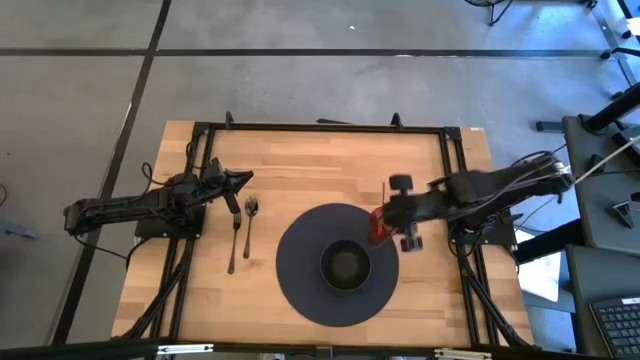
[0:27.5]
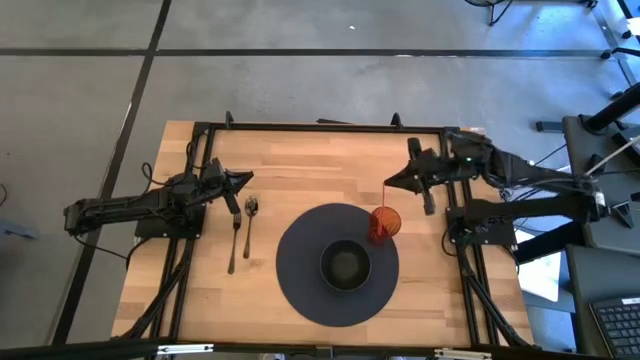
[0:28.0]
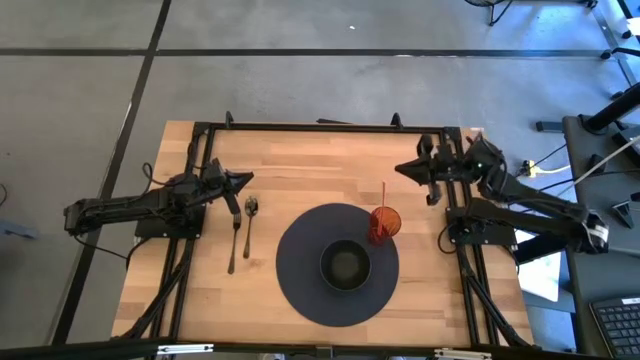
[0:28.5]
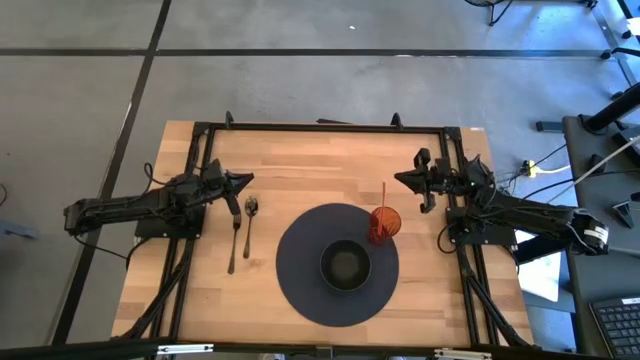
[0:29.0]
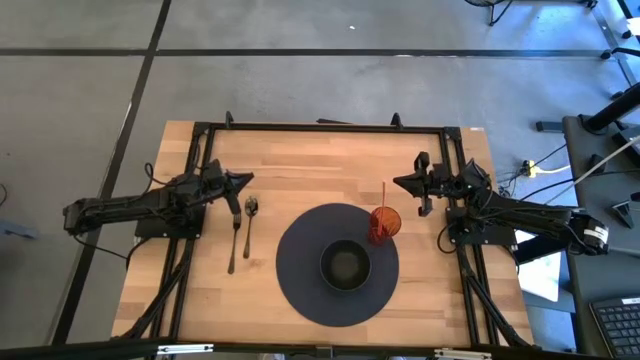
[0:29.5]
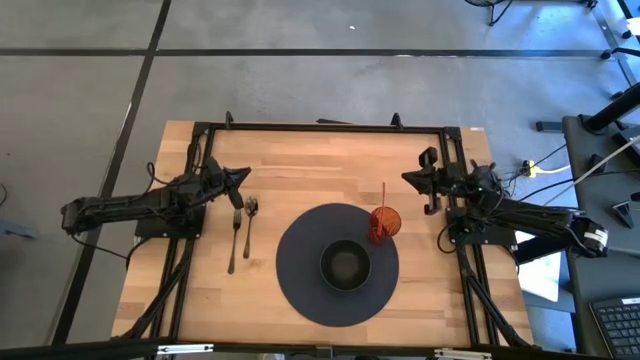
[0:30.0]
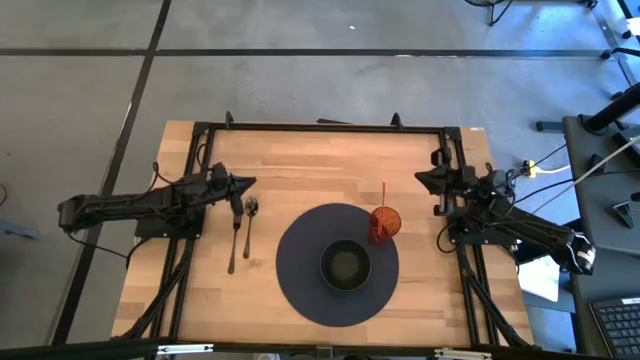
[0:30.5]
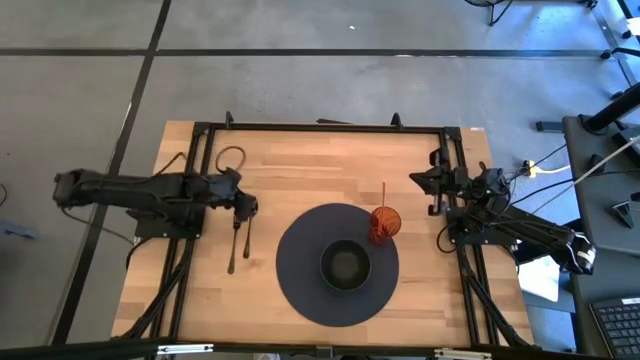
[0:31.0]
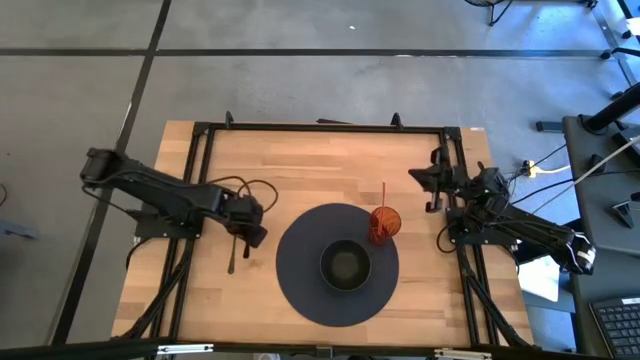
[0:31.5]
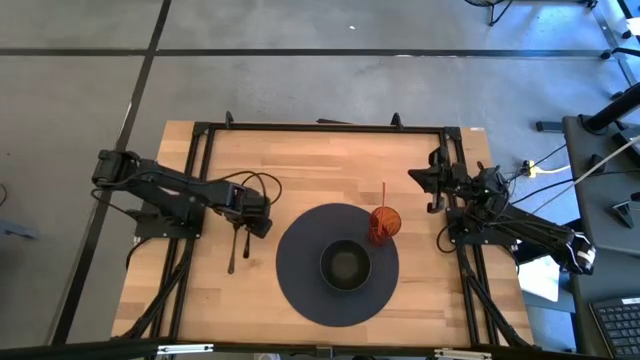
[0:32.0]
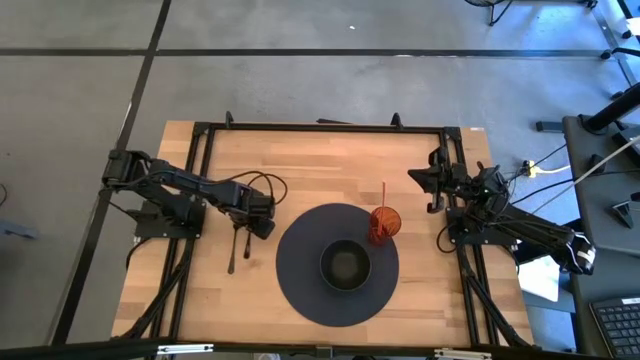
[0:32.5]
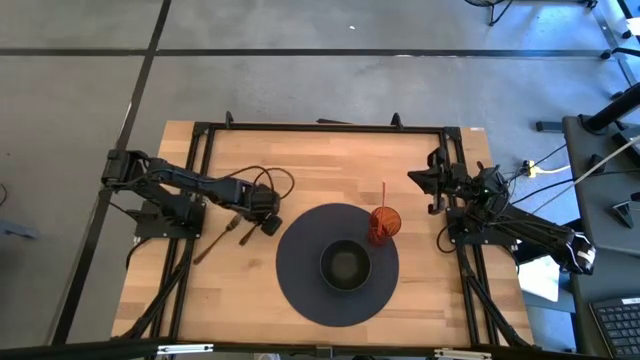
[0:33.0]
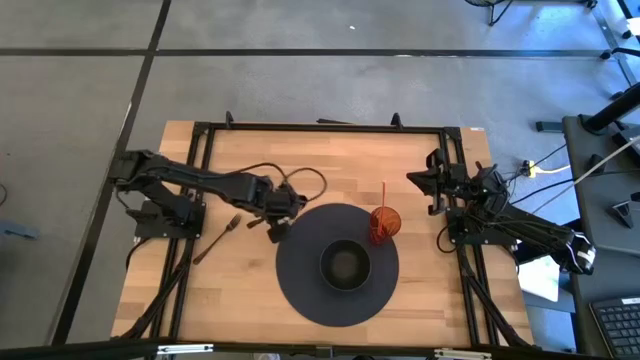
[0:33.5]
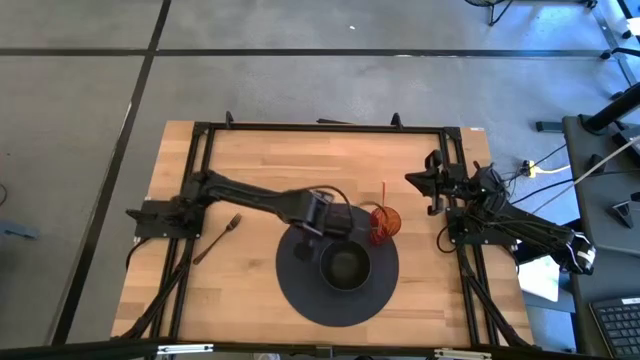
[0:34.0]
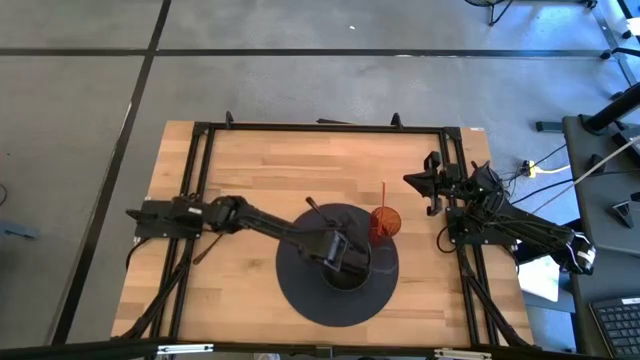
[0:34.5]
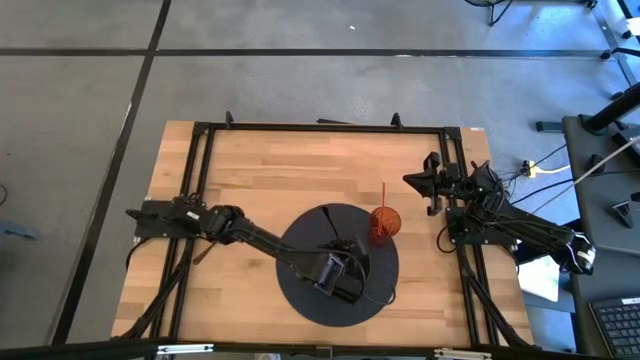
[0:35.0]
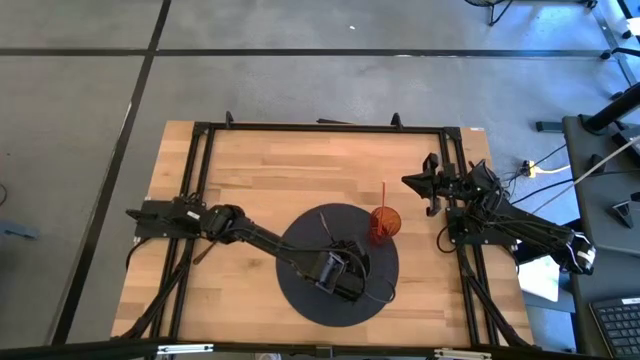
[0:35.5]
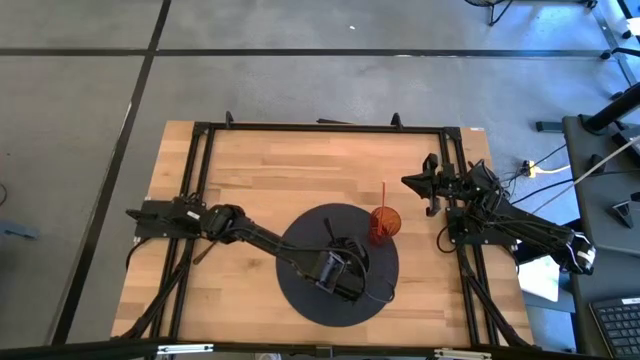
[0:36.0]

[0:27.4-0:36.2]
Task: Pick & Place Utensil
Put the black spoon into the black bowl

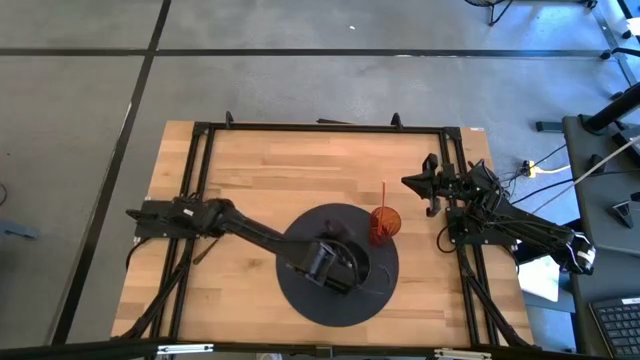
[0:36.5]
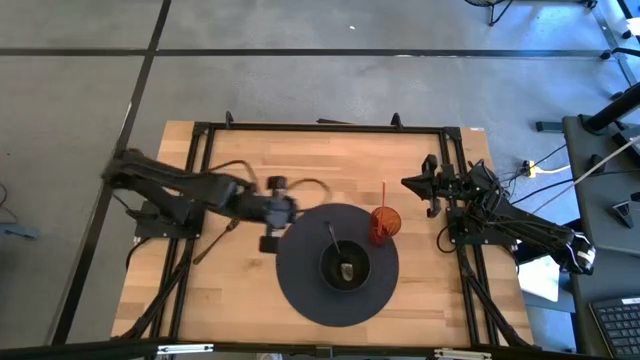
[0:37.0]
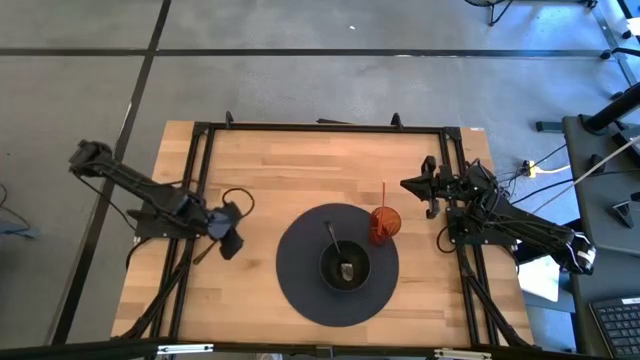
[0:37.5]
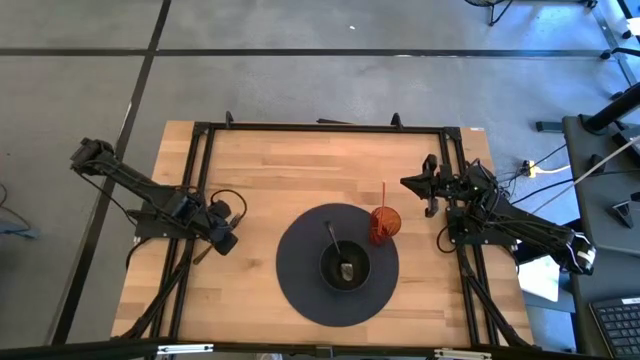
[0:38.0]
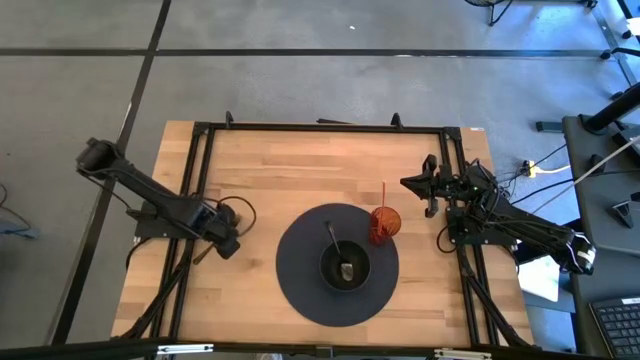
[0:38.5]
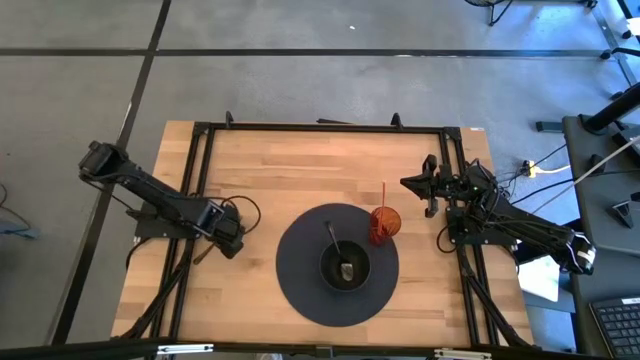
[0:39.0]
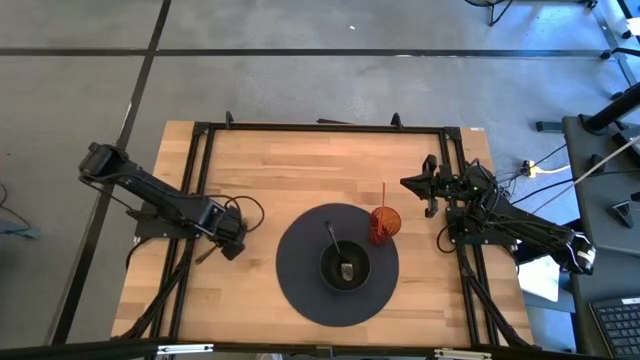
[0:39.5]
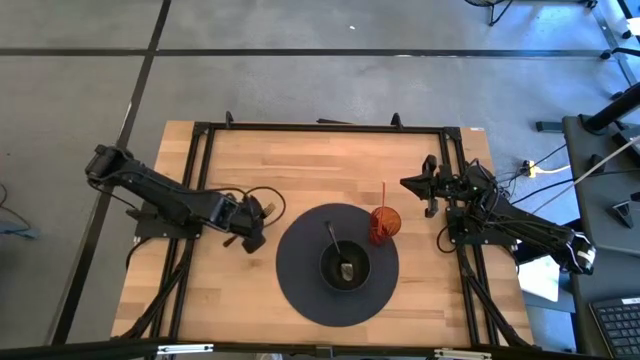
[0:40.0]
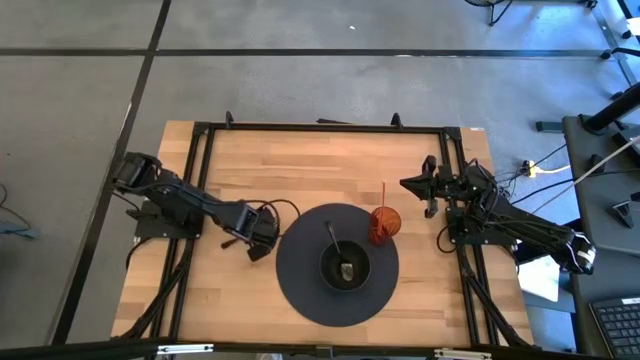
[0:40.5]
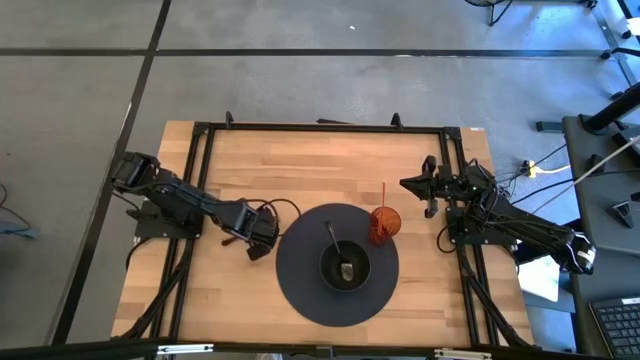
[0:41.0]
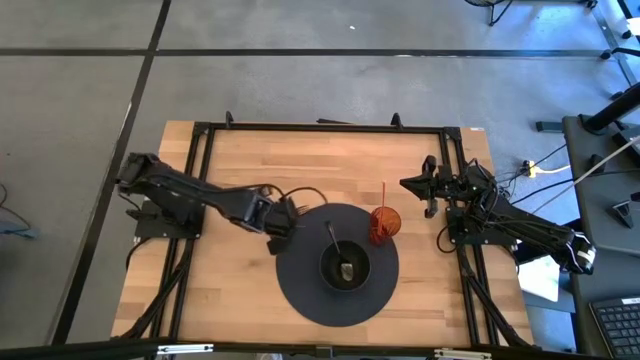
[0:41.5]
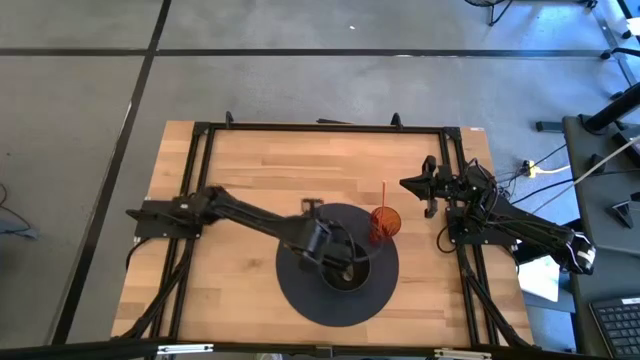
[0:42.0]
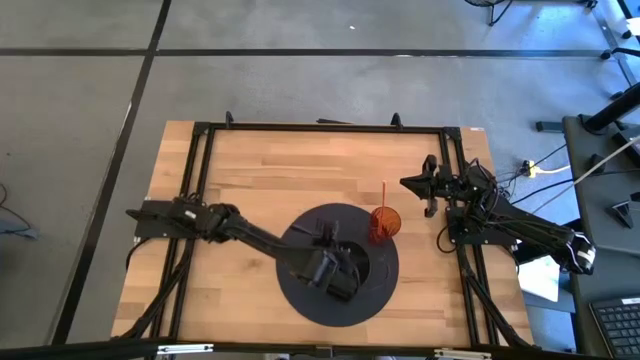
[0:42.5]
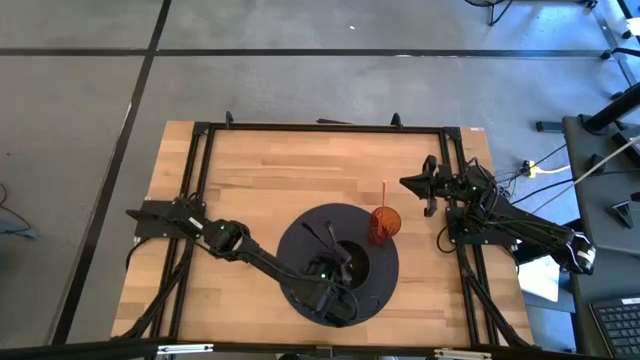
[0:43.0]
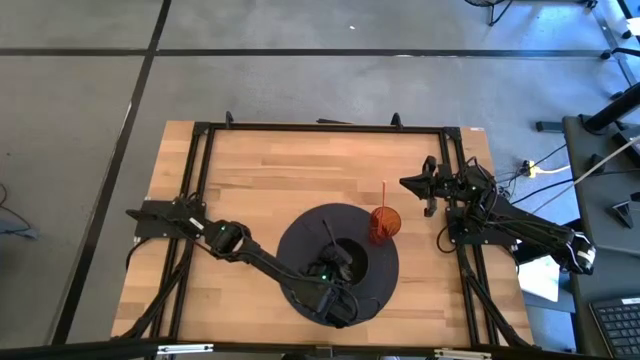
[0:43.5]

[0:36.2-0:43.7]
Put the black fork into the black bowl

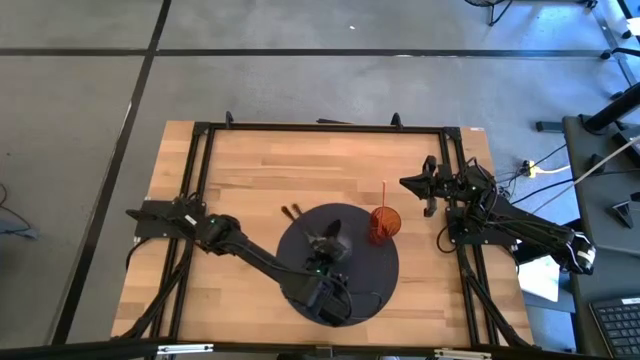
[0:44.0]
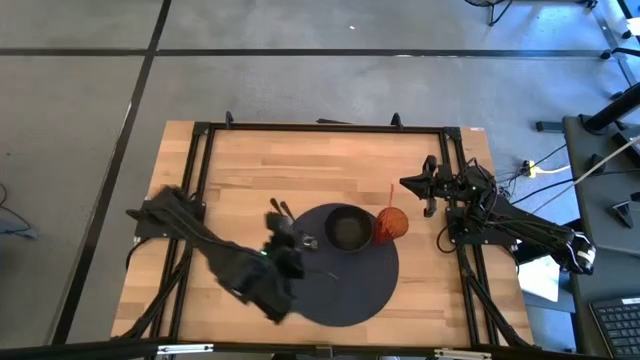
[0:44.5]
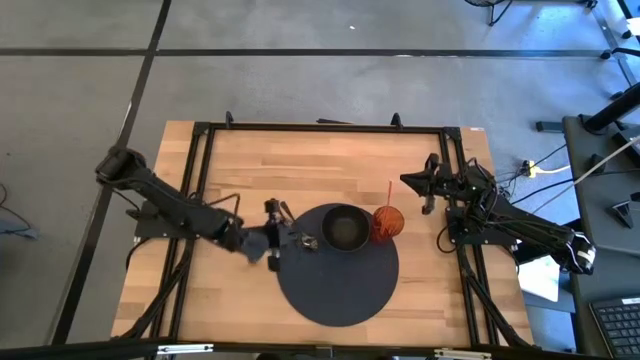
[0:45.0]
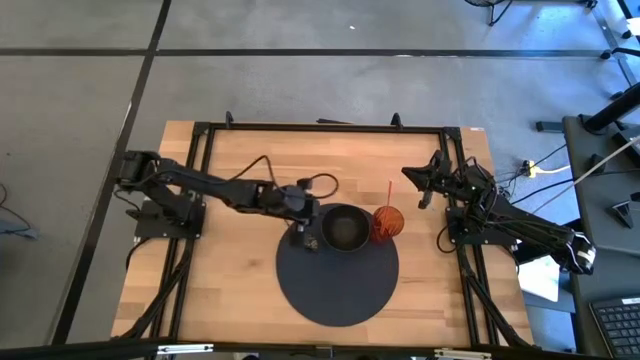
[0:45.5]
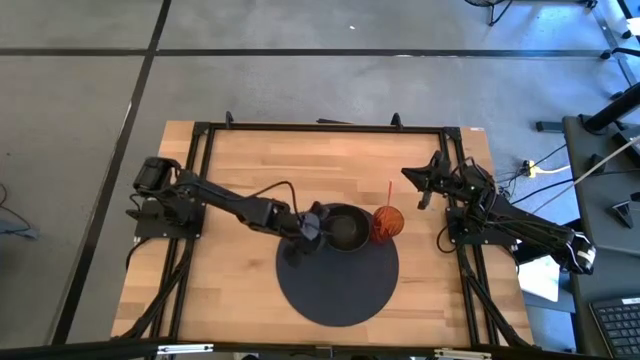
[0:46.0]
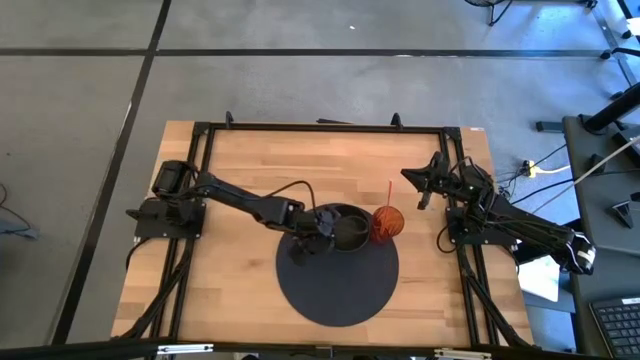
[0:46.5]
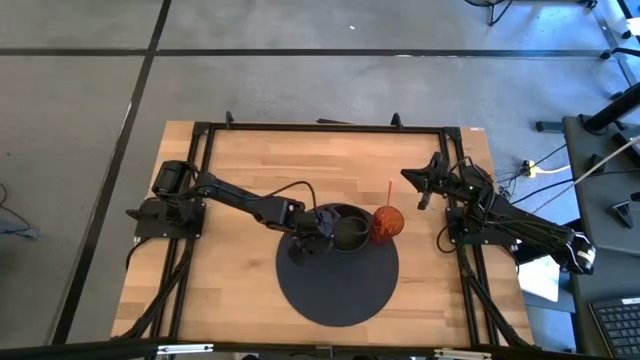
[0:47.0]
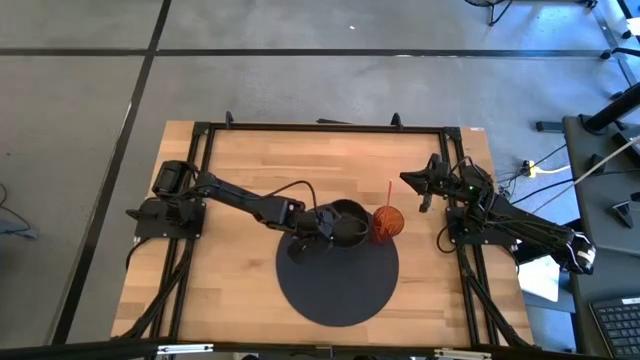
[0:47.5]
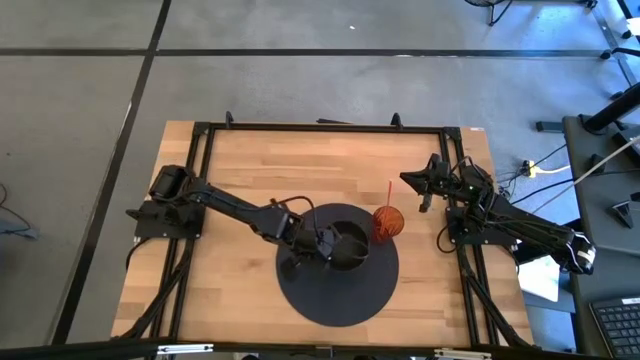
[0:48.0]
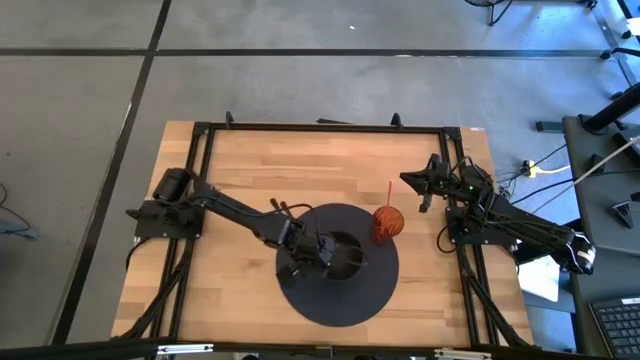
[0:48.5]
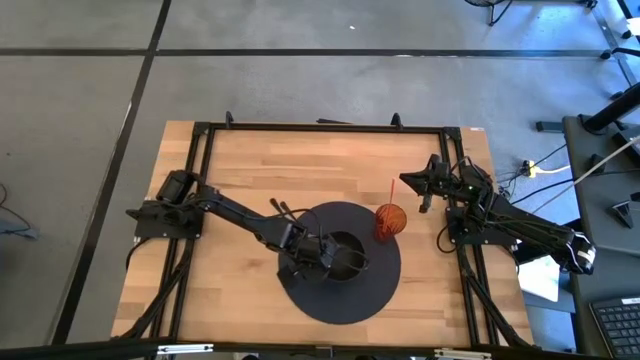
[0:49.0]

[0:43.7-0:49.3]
Adjust the black bowl
